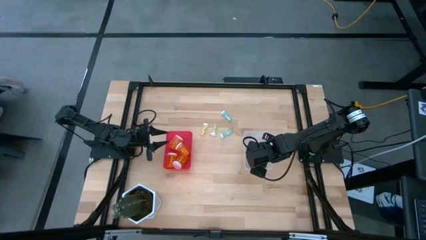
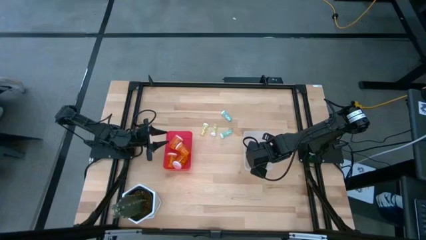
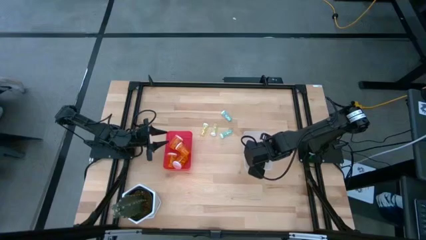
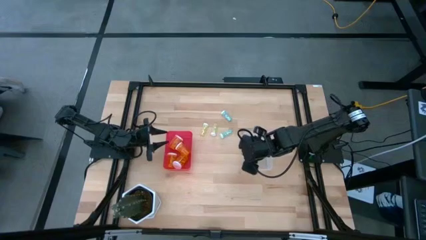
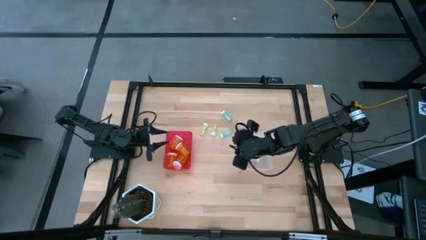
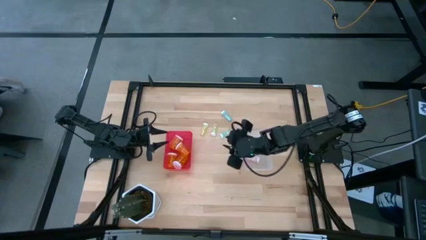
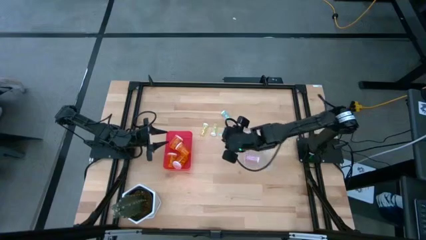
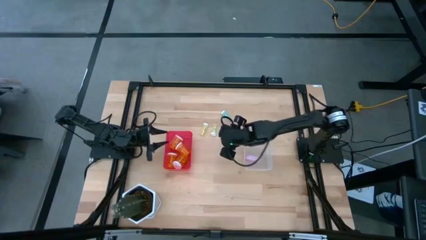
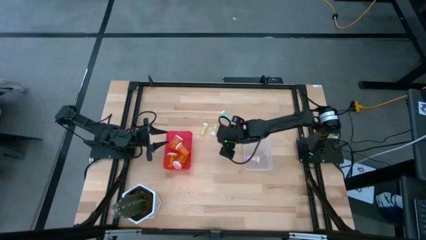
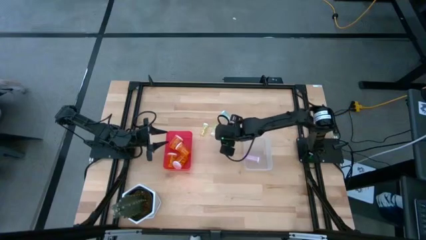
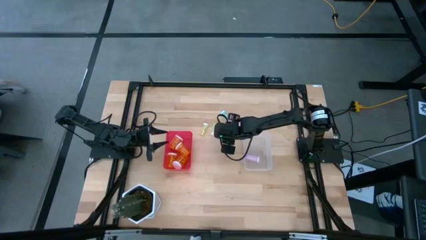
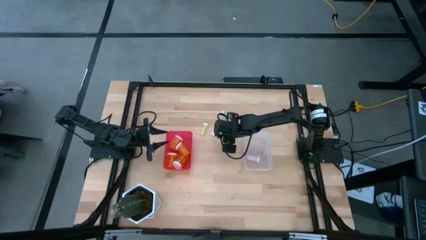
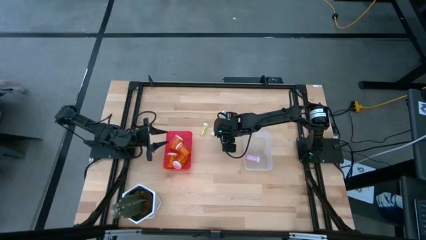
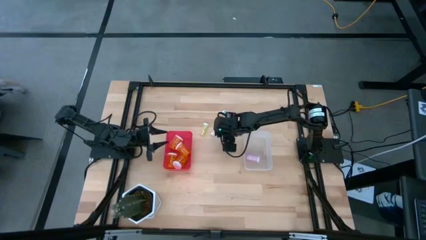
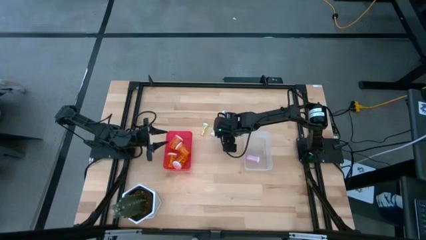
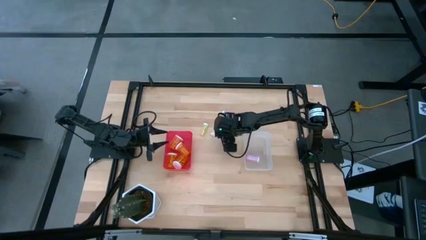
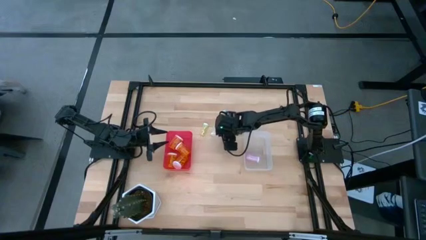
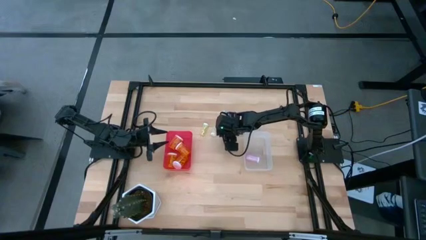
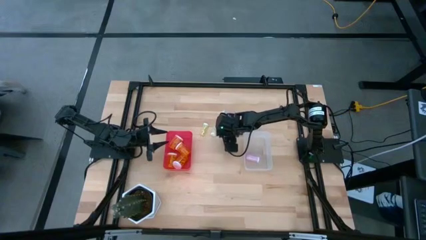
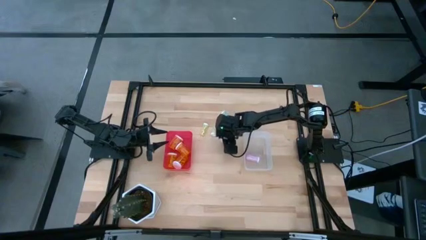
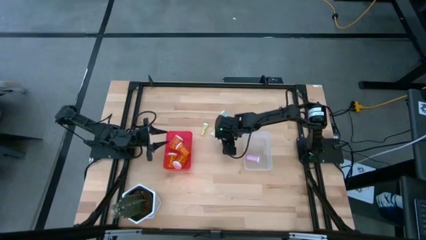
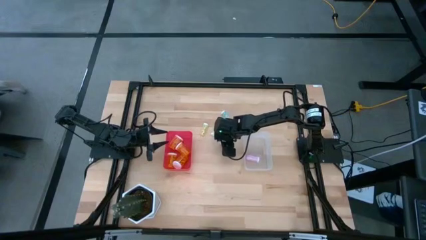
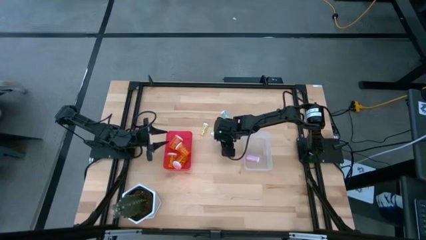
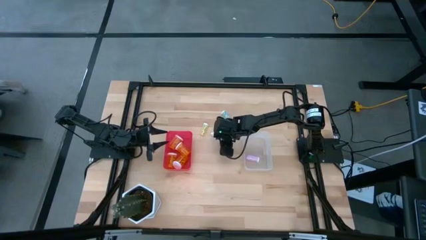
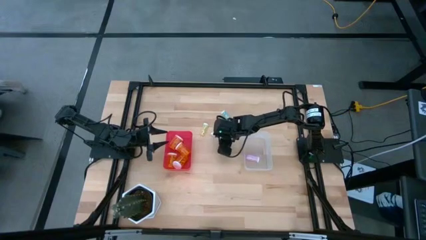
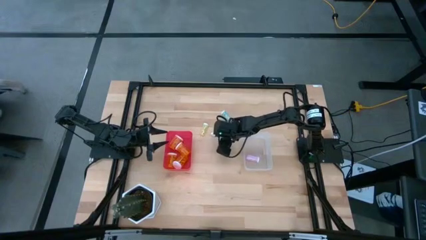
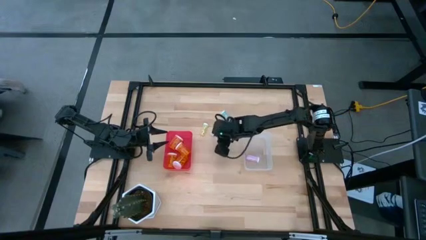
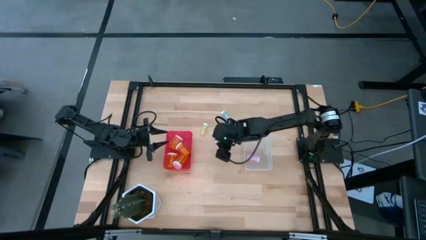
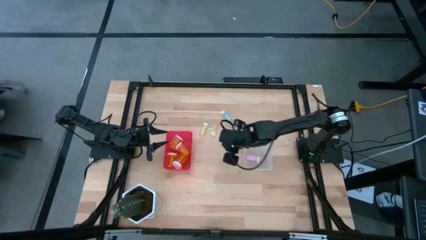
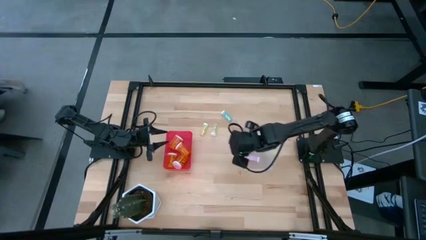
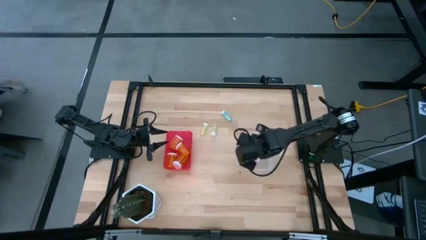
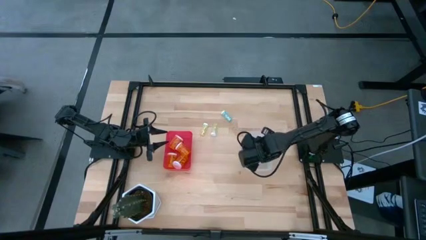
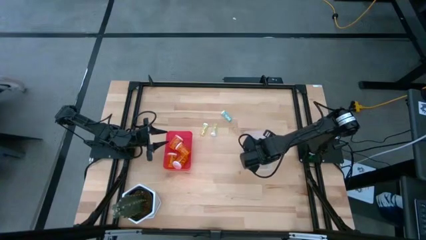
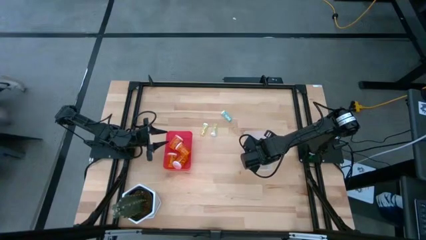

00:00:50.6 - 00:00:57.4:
Task: Pick and place medicine bottles into bin by pill shape (circle, oval)
Put the bottom small blue pill bottle into the transparent bin

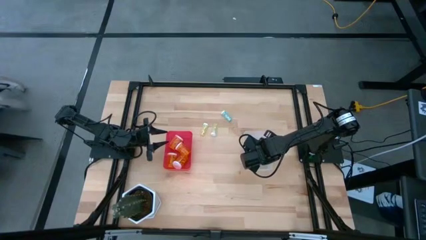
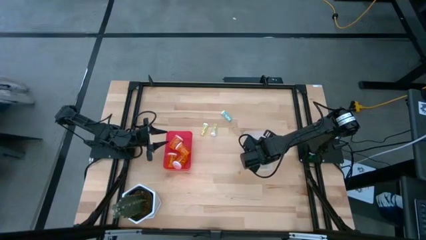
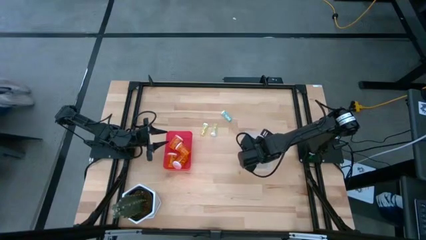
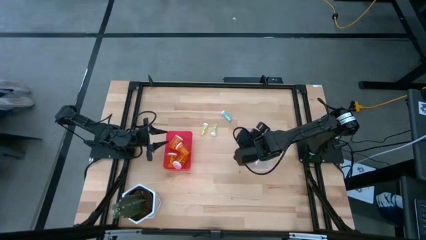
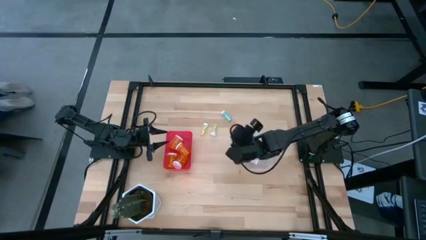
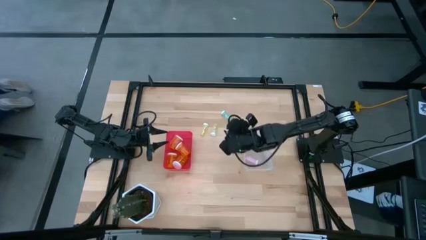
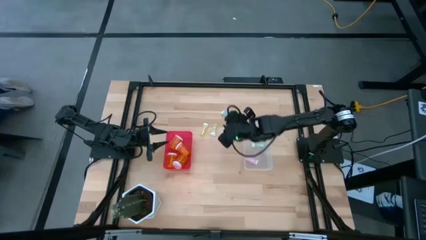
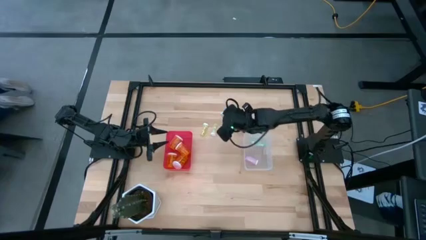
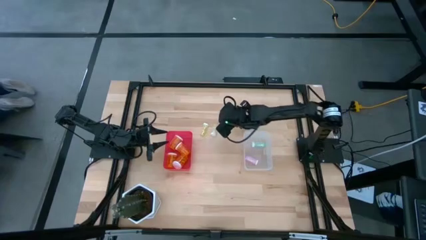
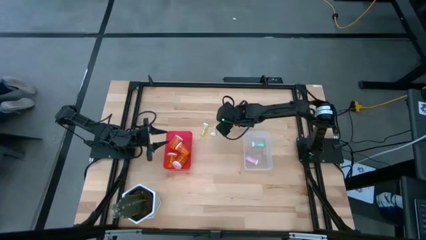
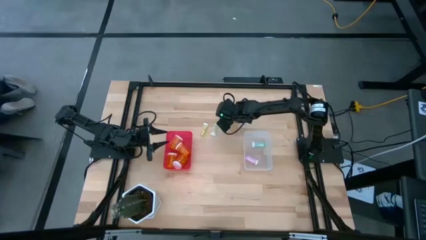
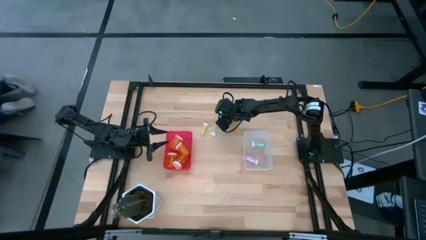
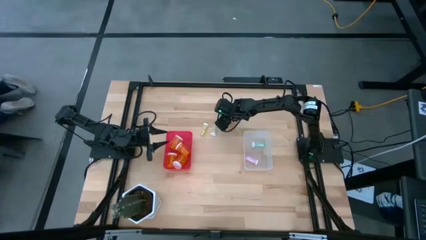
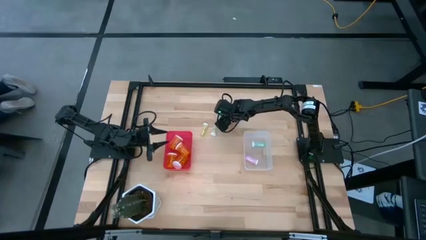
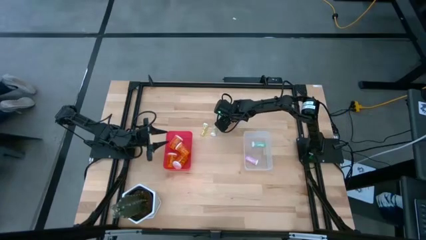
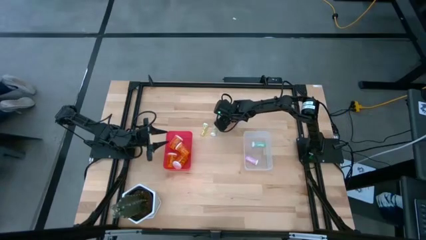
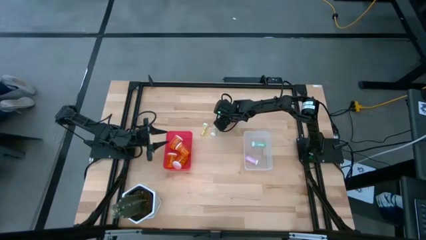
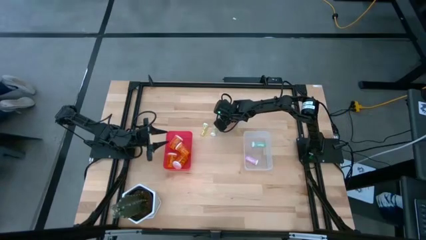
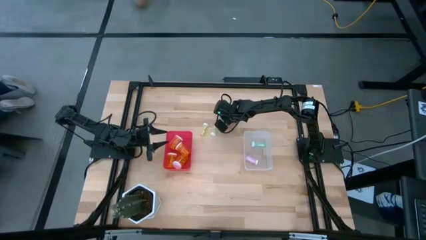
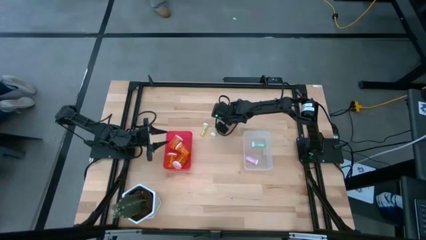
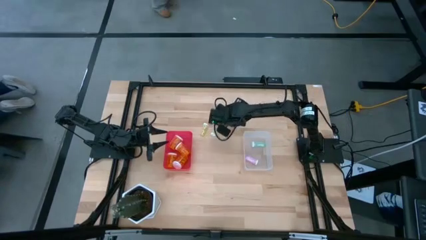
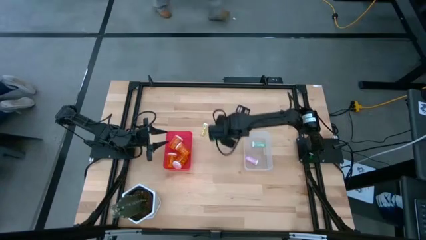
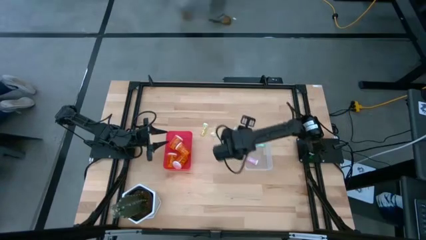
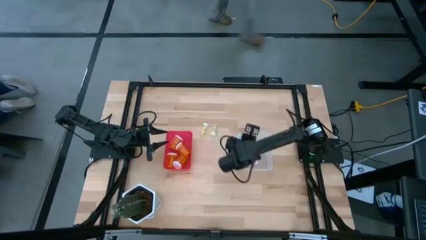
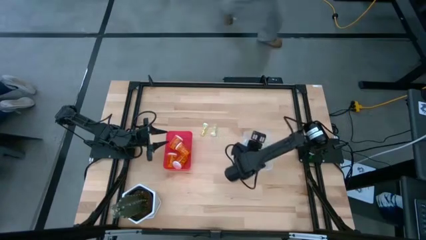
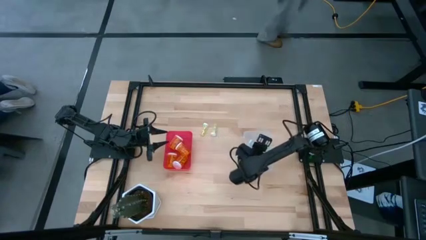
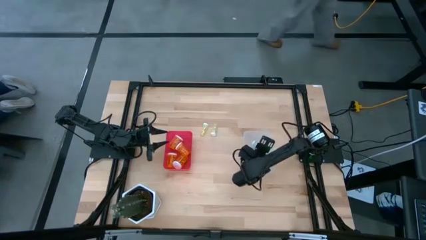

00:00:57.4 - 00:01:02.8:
Put the small blue pill bottle into the transparent bin

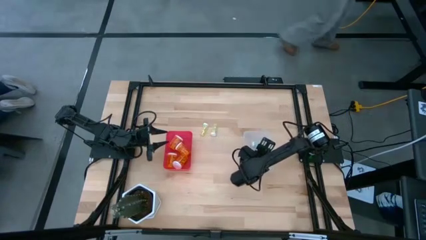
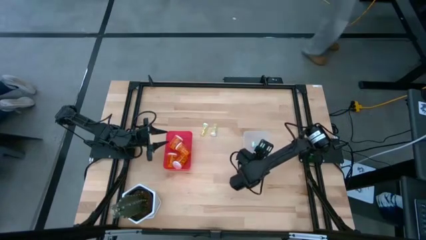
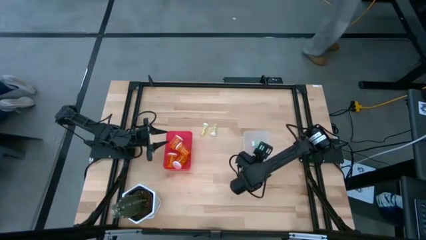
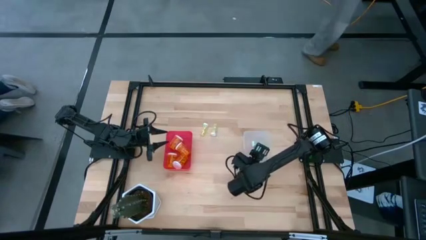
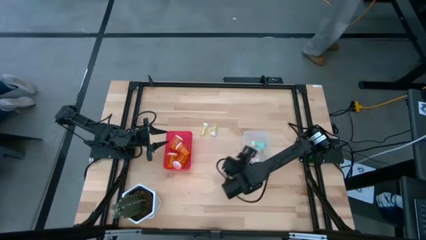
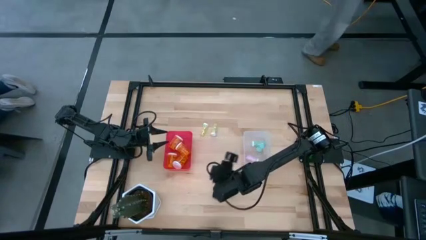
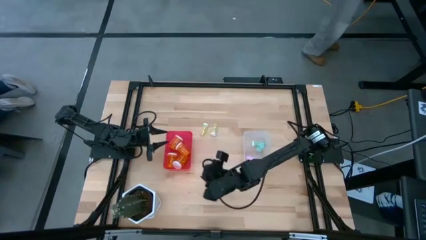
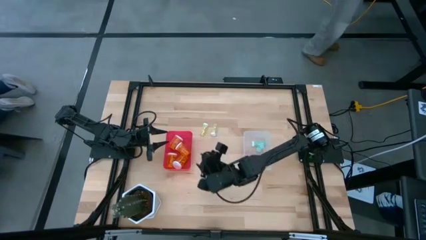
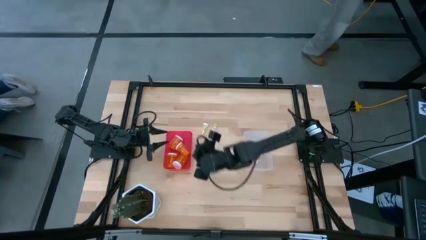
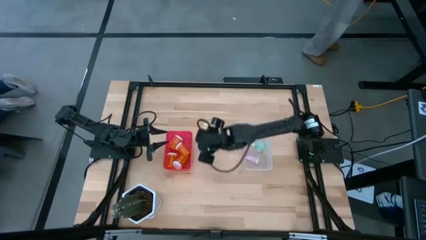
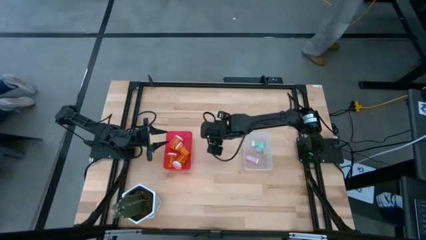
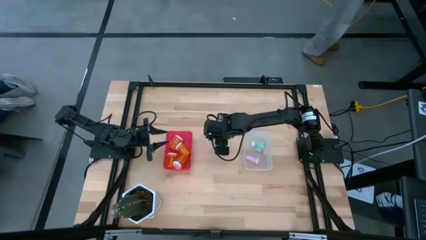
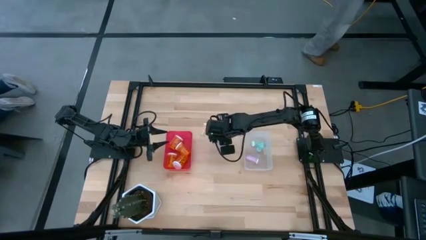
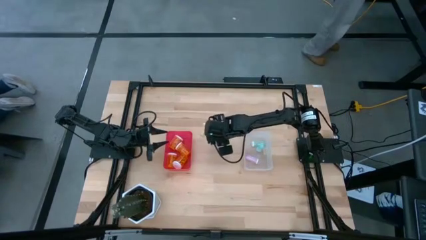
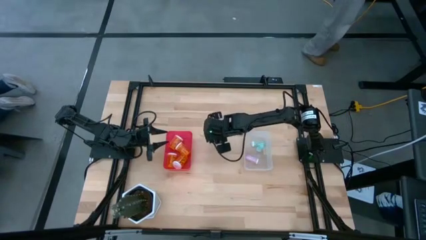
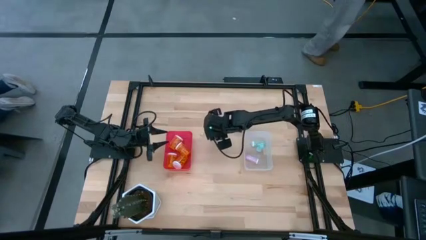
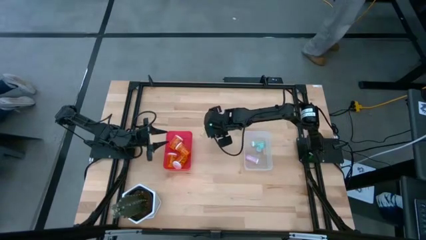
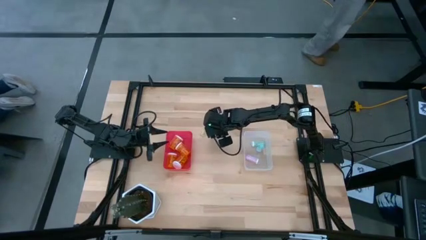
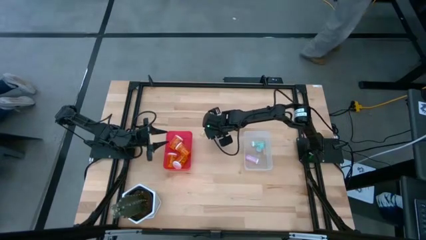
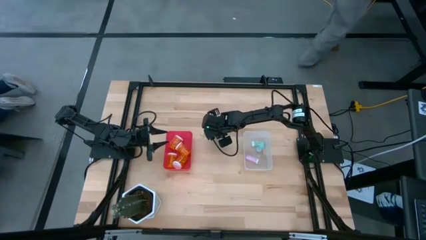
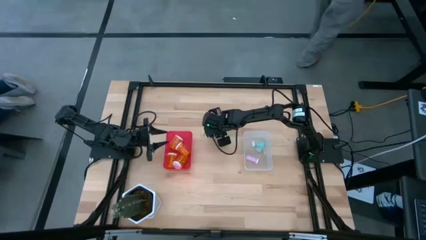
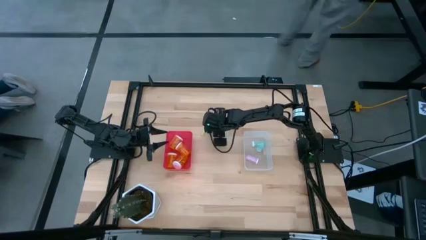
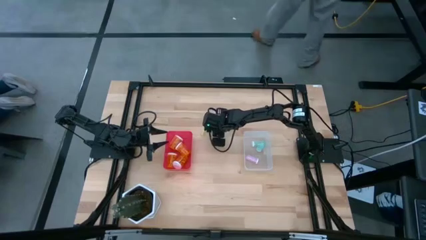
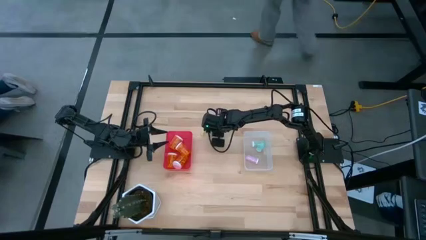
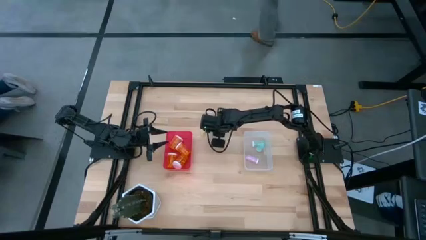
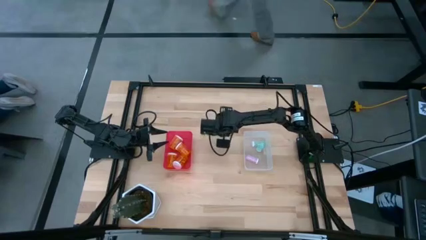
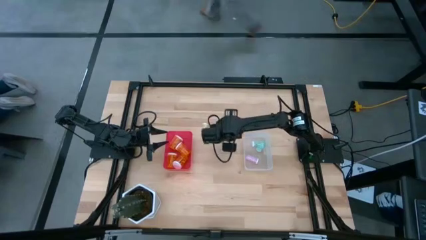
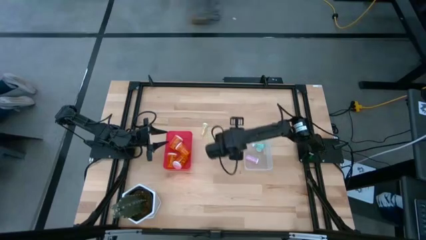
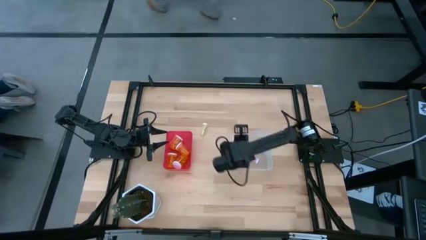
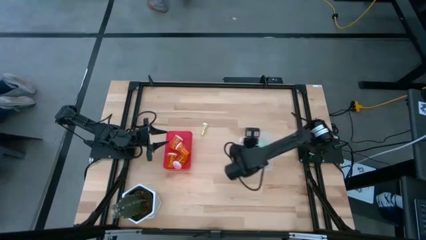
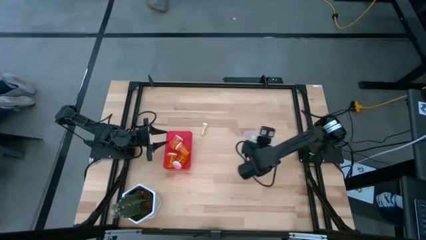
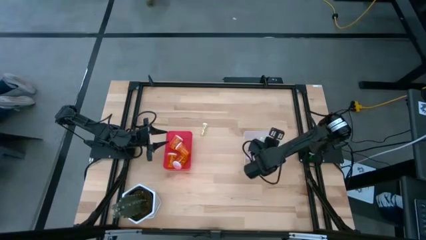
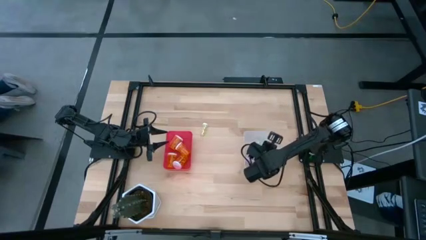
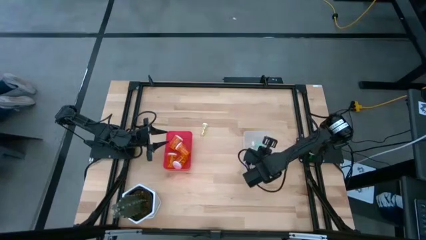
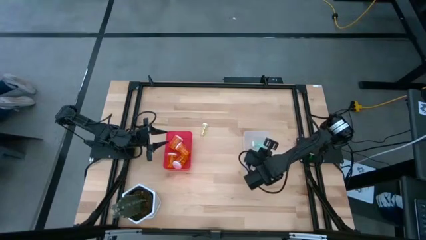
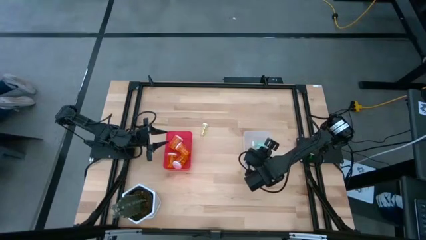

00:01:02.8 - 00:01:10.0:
Put the right small yellow pill bottle into the transparent bin
